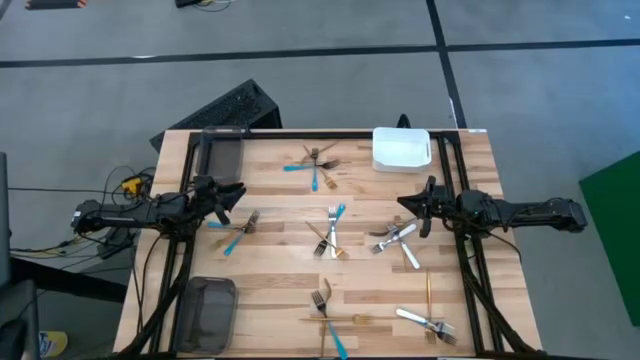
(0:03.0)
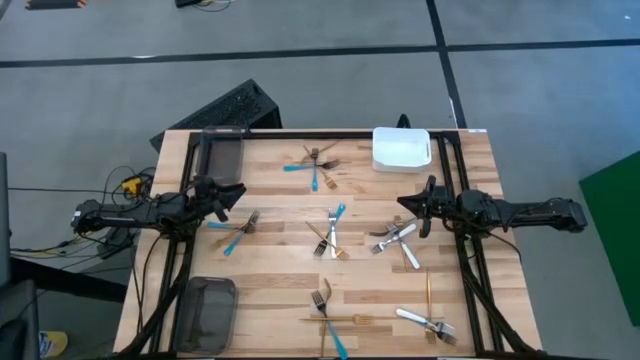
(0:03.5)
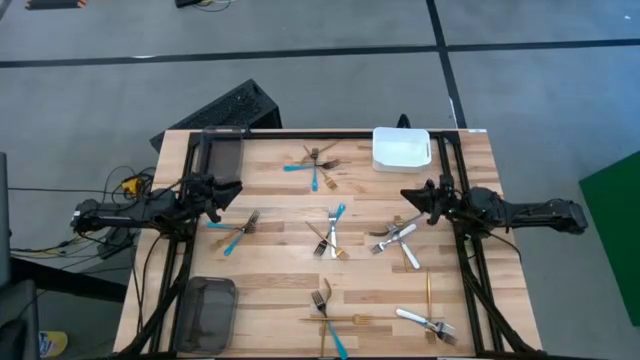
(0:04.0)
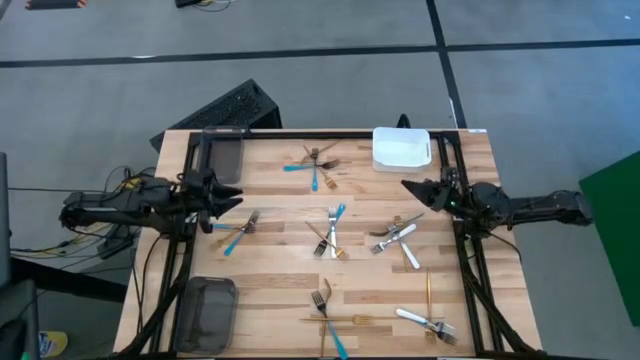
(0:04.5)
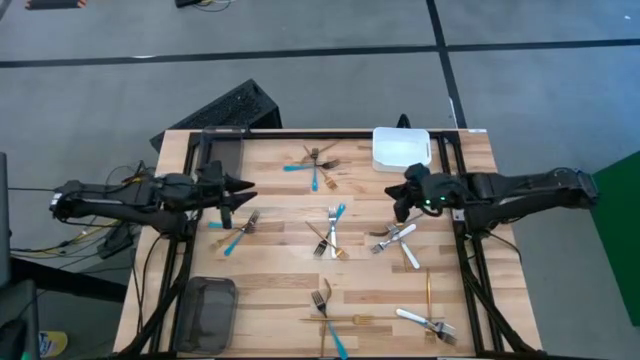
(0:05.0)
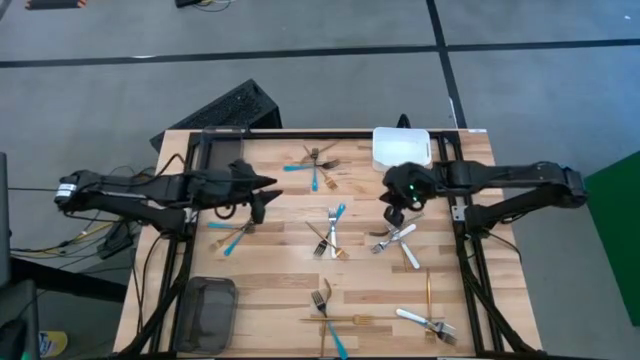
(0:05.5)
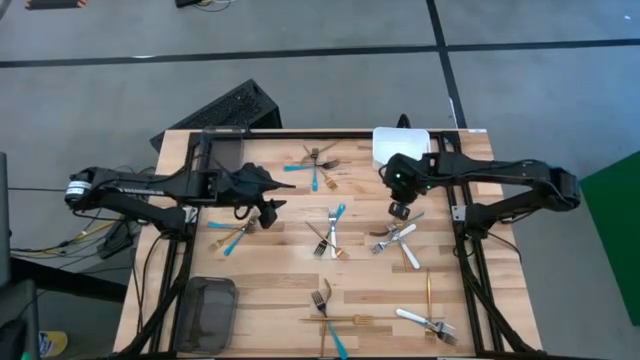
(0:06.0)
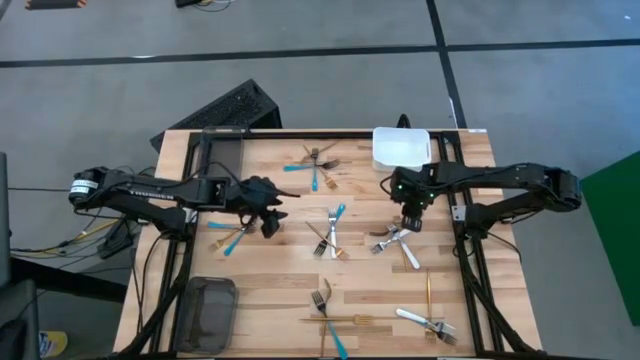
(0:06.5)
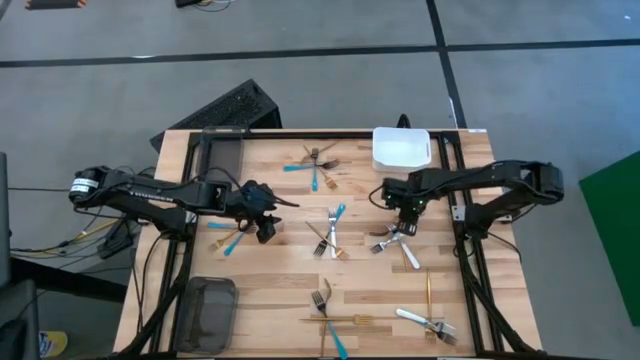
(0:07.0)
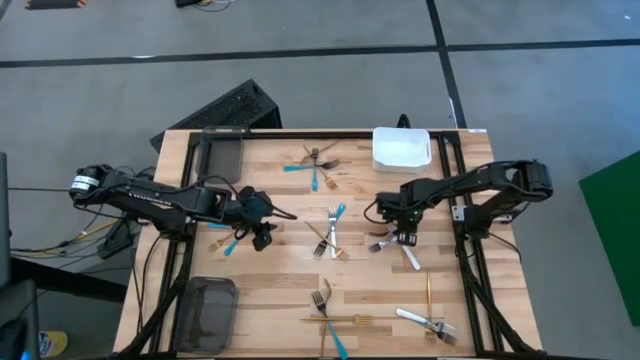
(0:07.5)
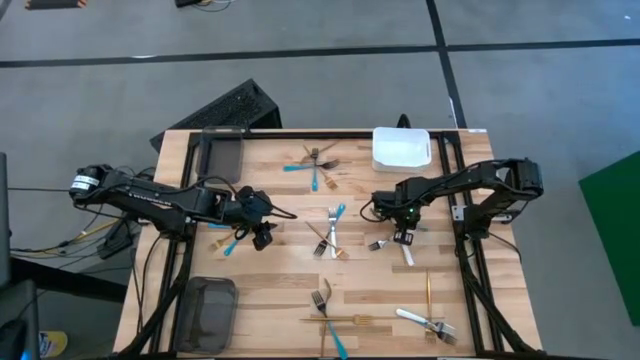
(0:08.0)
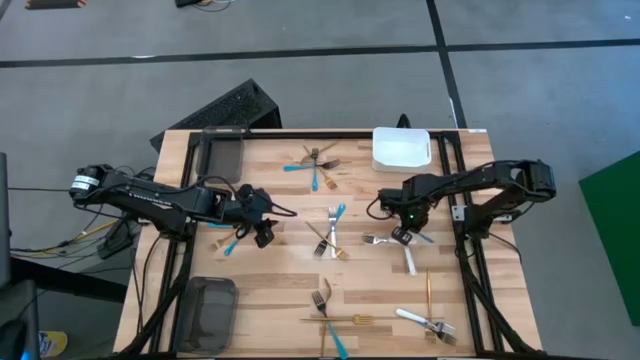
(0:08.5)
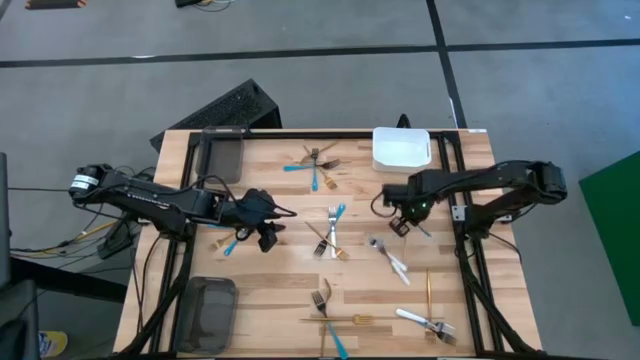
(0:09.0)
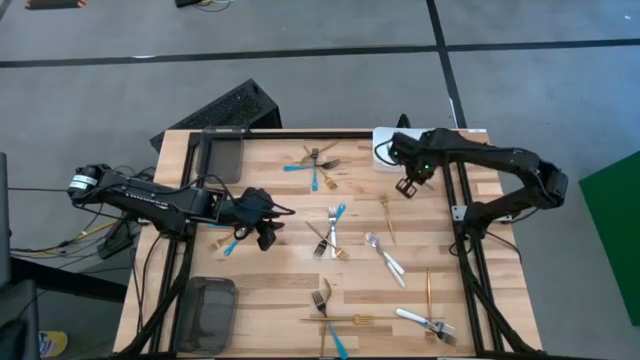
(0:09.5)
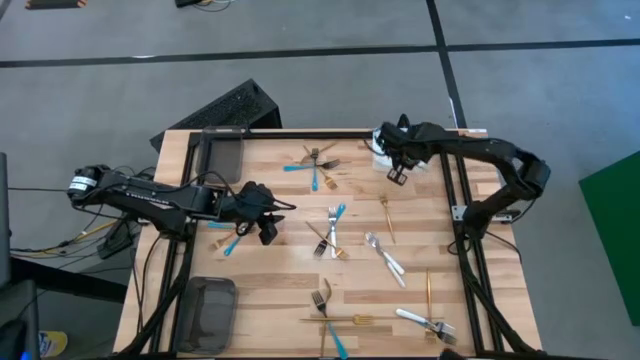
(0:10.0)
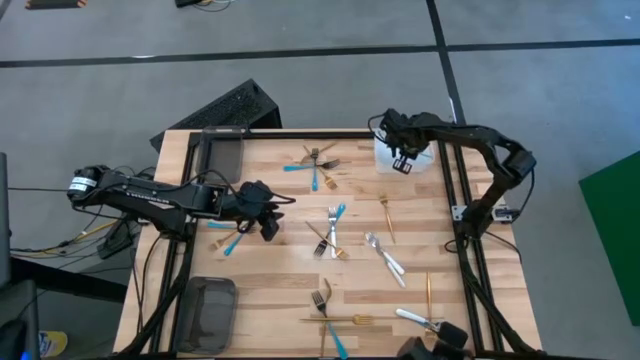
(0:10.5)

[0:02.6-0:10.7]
Task: Sort silverware by color (type)
Put the blue fork into the white bin

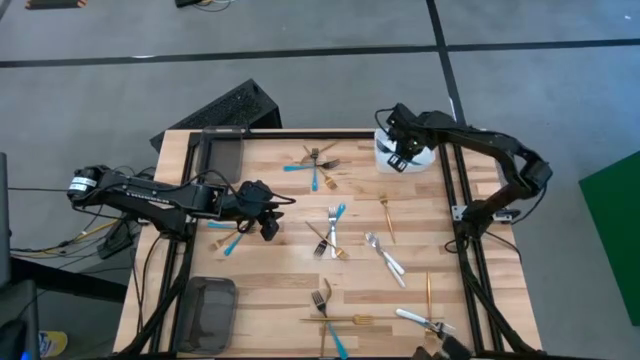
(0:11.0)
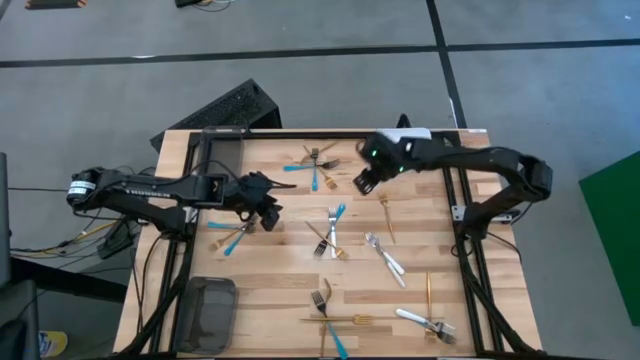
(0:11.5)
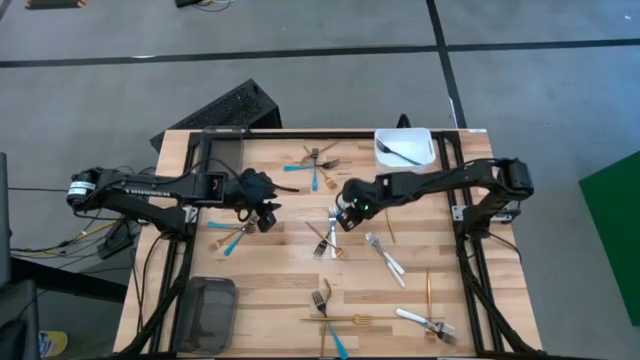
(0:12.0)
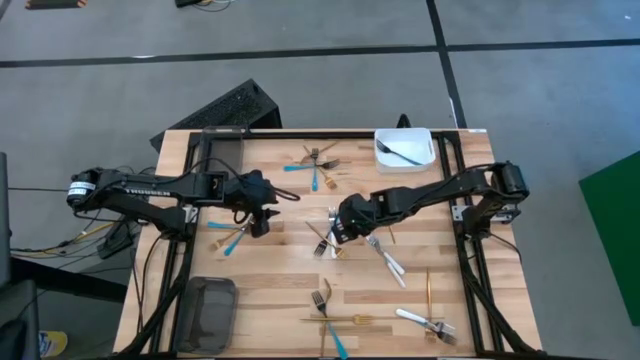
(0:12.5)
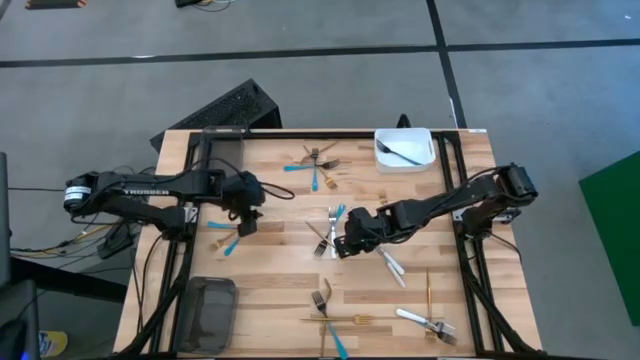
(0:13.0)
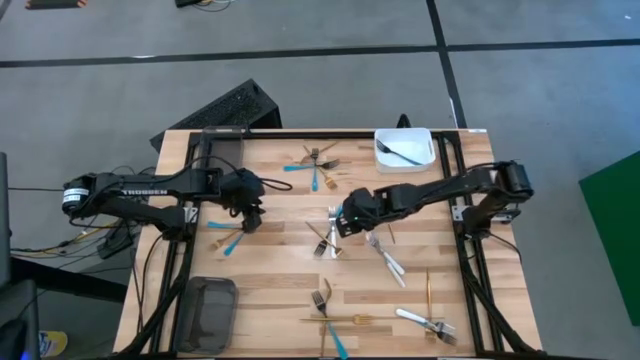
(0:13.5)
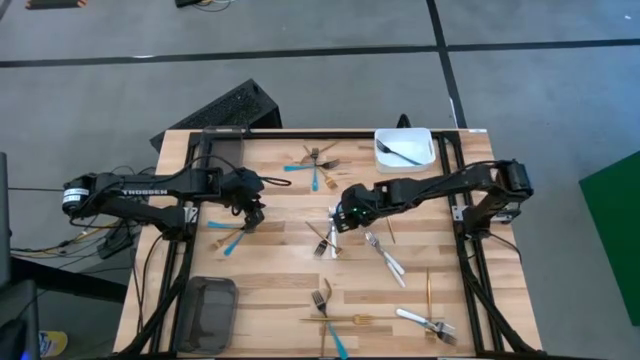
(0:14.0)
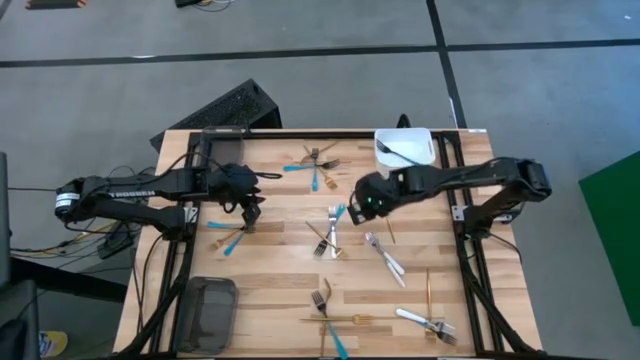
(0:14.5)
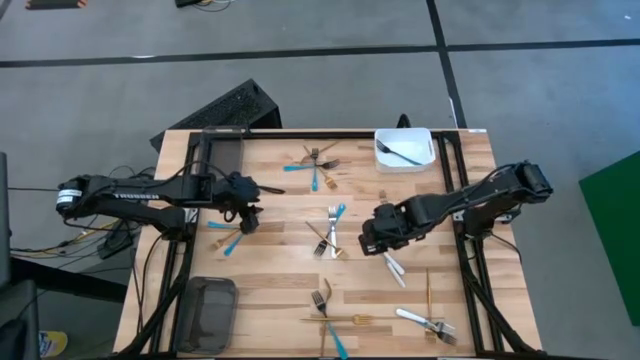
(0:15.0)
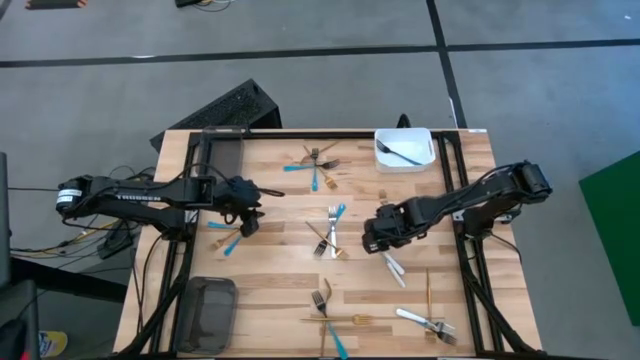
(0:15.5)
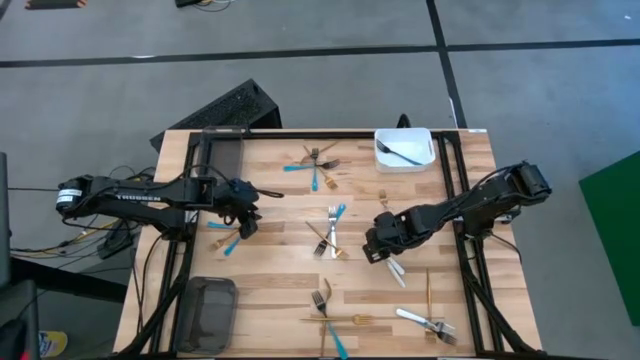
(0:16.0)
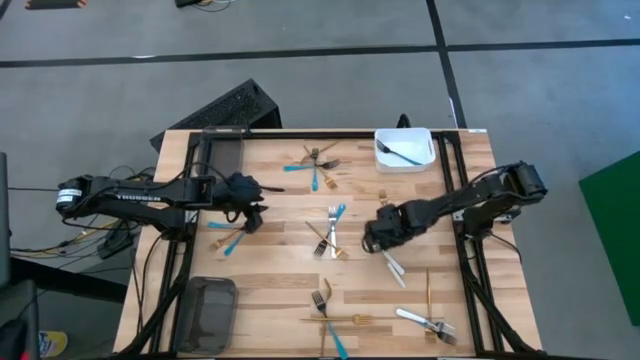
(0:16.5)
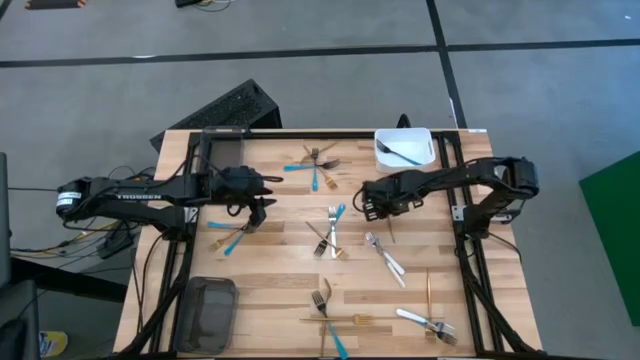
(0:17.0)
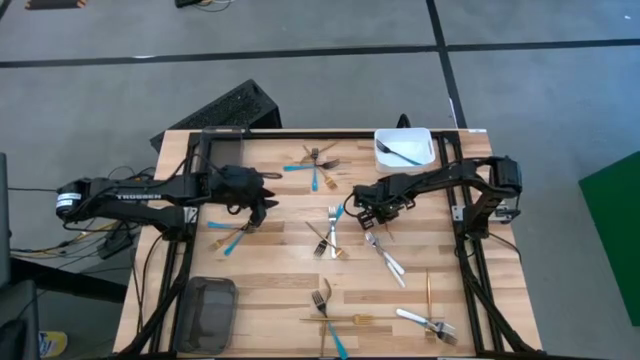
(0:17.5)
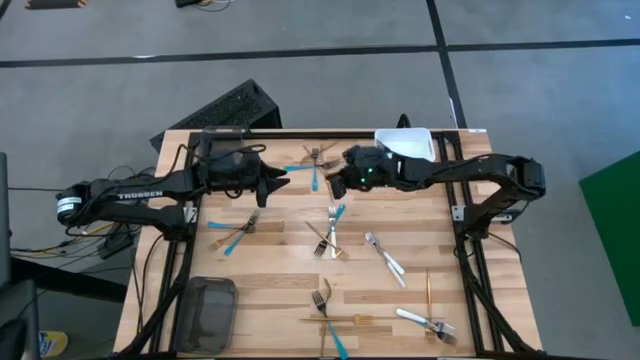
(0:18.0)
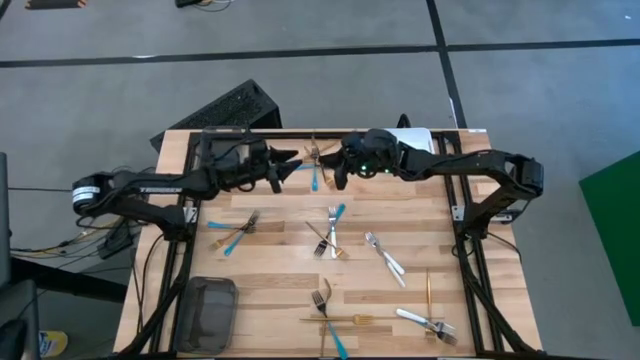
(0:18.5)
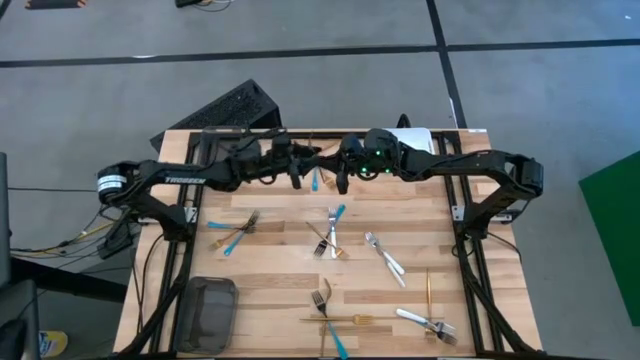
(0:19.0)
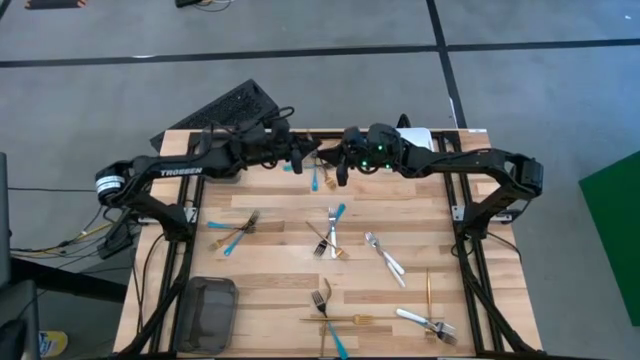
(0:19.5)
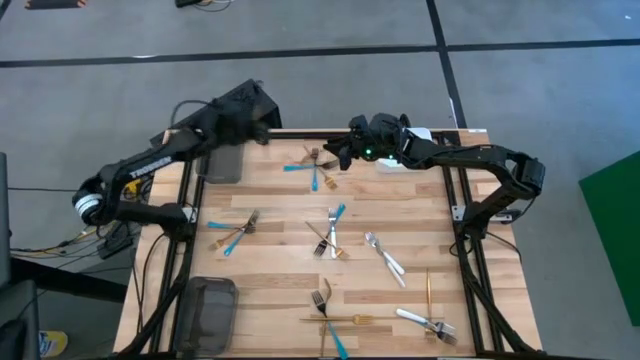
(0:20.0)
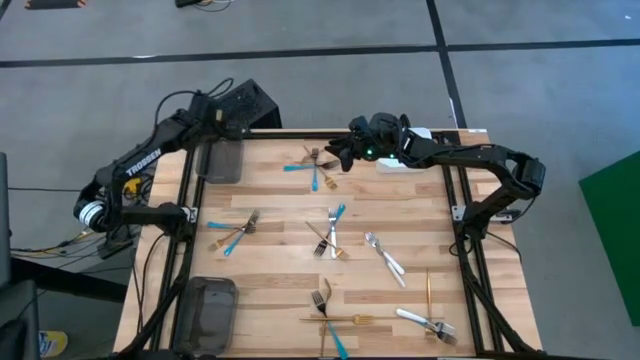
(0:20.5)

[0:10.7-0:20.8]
Put the gold fork into the top black bin

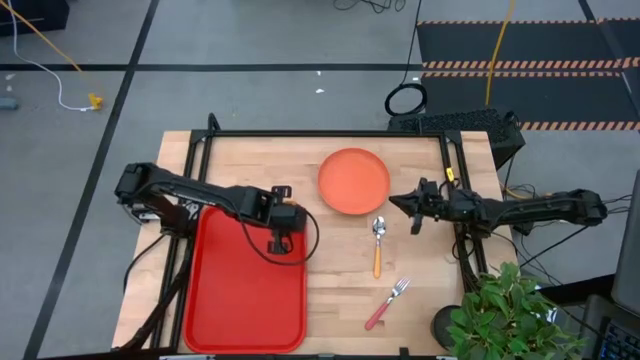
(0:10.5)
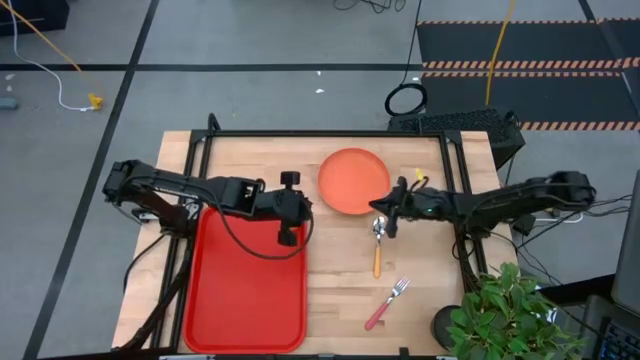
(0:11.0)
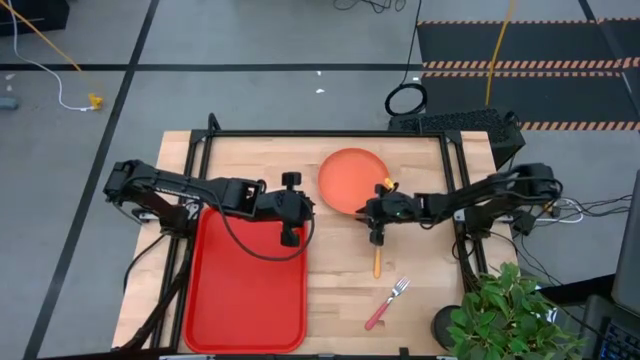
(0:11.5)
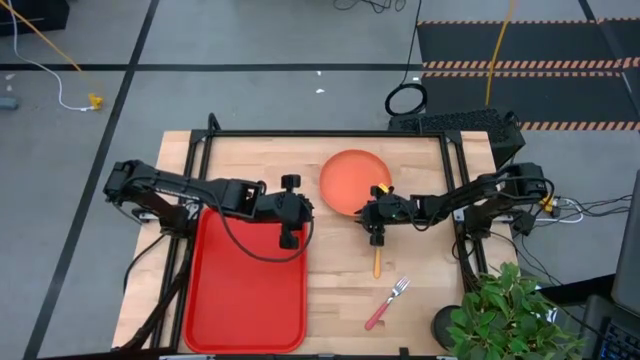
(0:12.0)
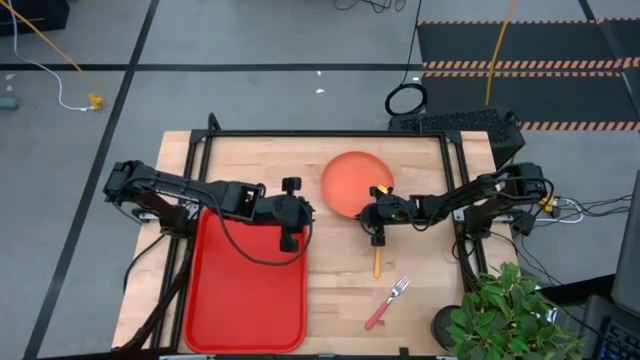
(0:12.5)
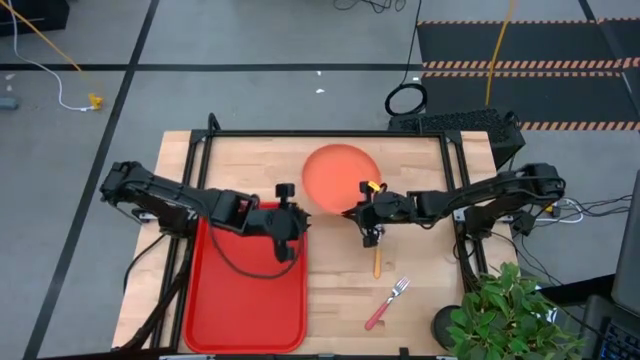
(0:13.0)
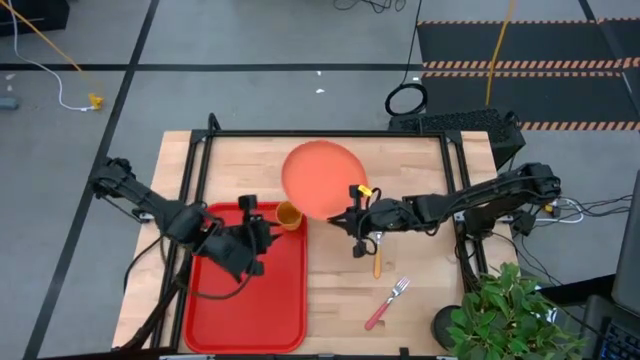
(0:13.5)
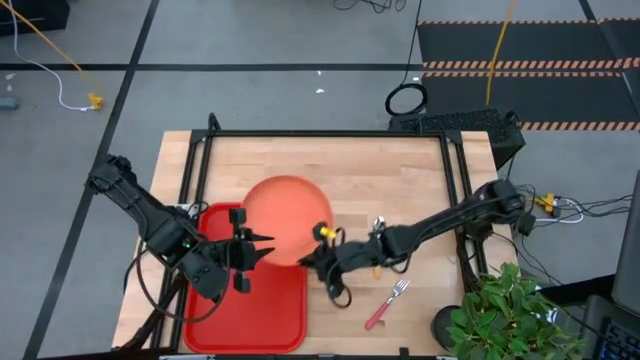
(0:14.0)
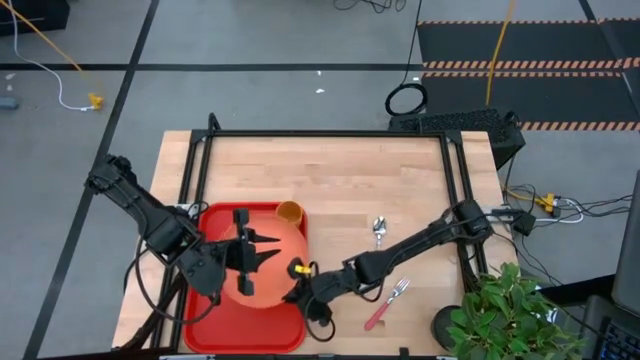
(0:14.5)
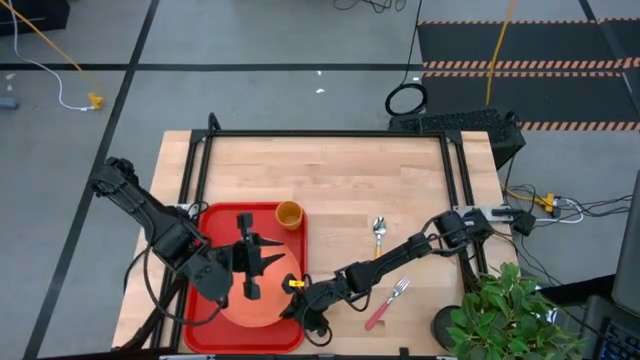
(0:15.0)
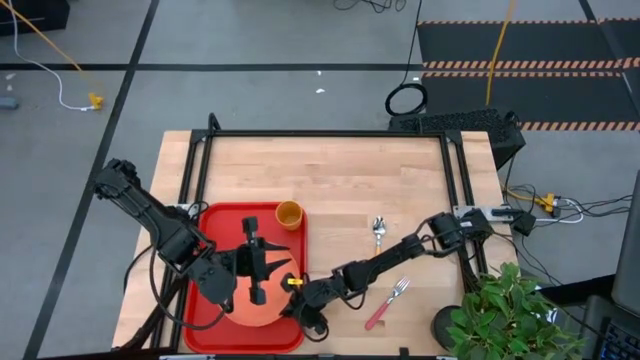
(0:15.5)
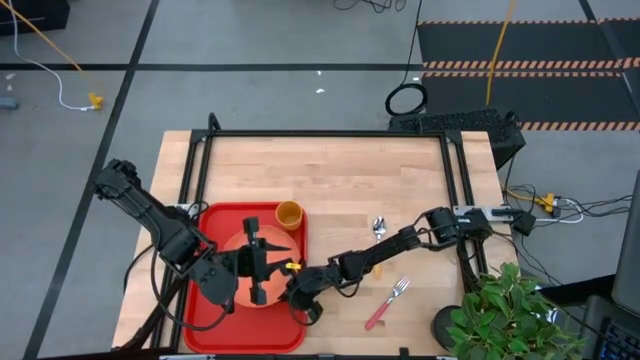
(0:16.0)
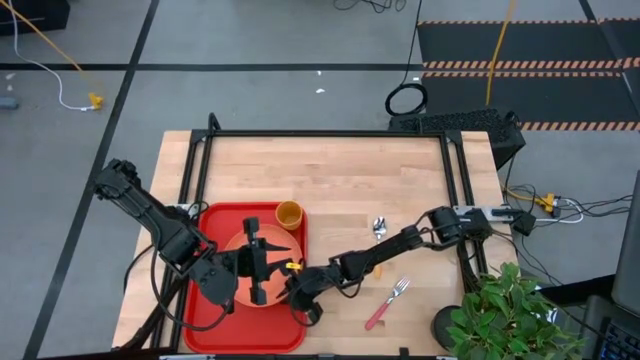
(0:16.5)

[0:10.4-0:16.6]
Task: Pick and place plate/cup/fork/spoon on tray
Put the orange plate on the center of the red tray
